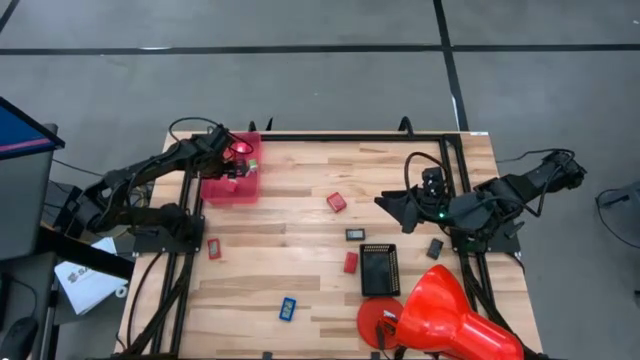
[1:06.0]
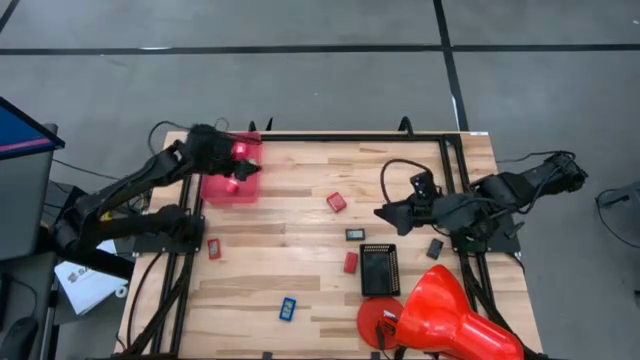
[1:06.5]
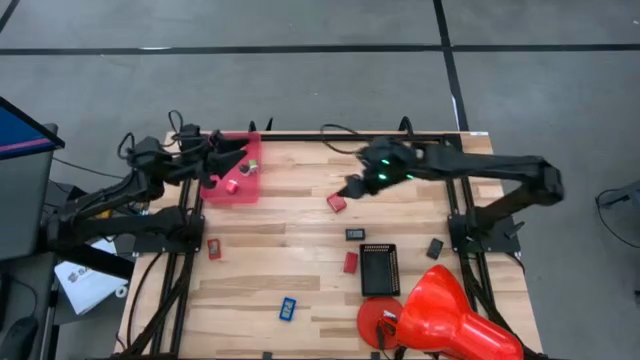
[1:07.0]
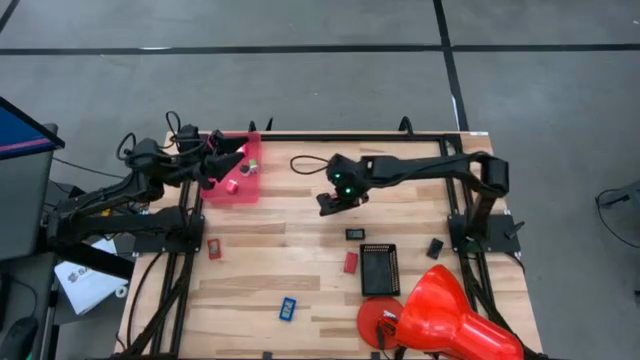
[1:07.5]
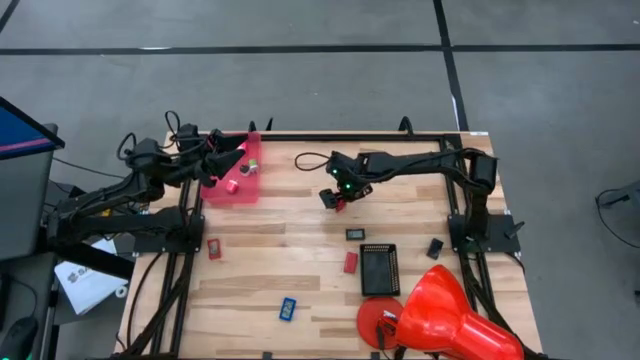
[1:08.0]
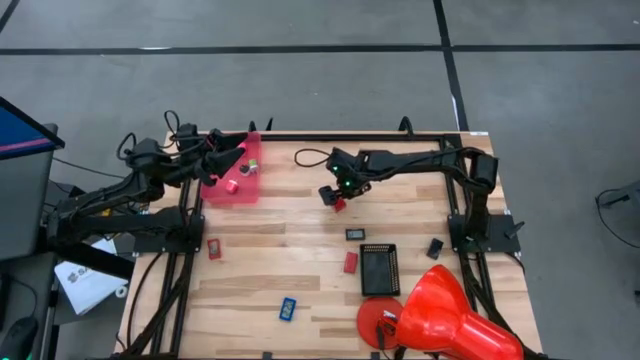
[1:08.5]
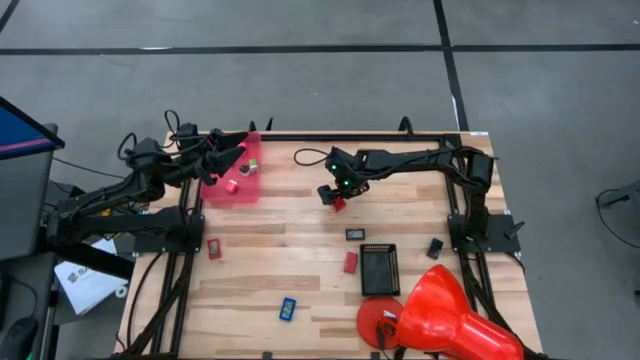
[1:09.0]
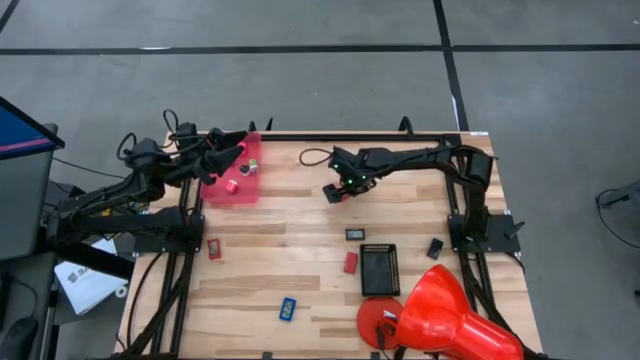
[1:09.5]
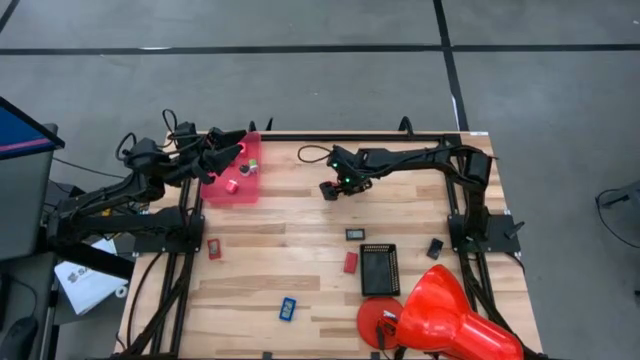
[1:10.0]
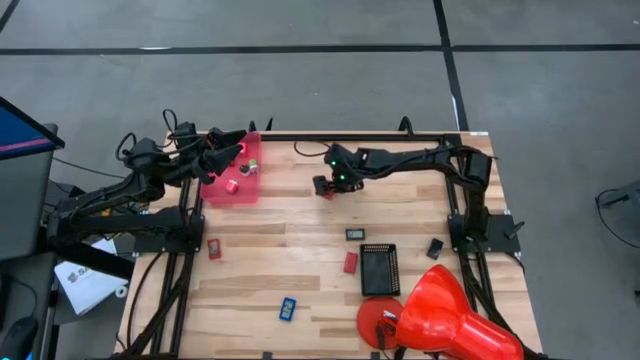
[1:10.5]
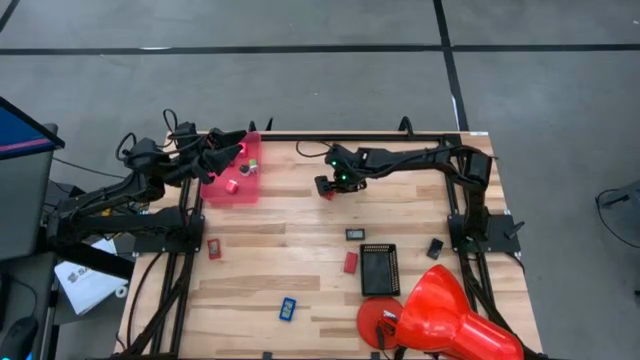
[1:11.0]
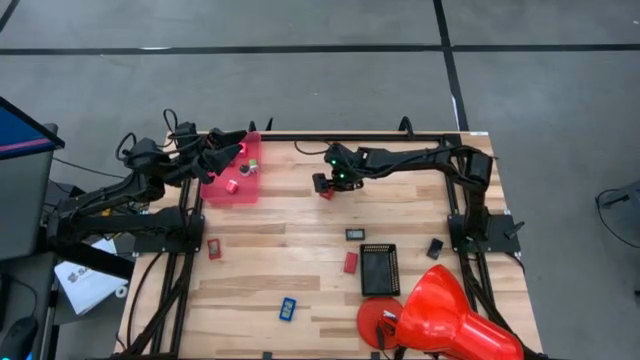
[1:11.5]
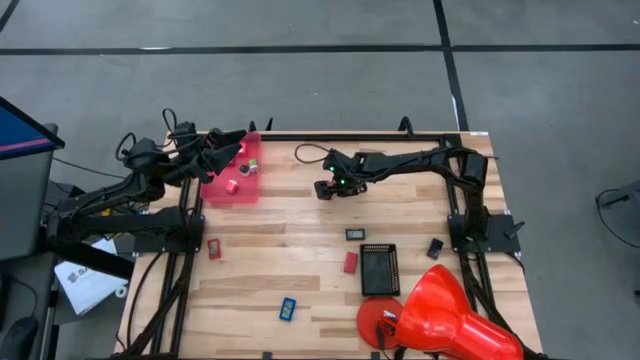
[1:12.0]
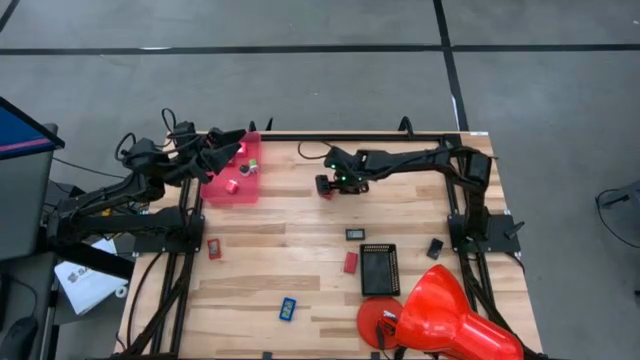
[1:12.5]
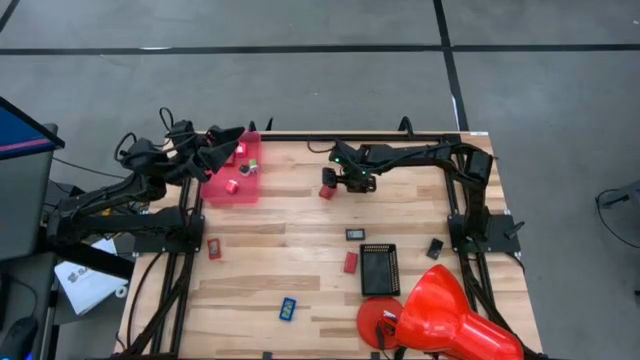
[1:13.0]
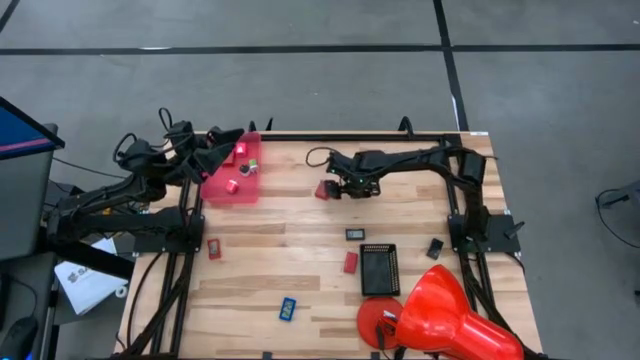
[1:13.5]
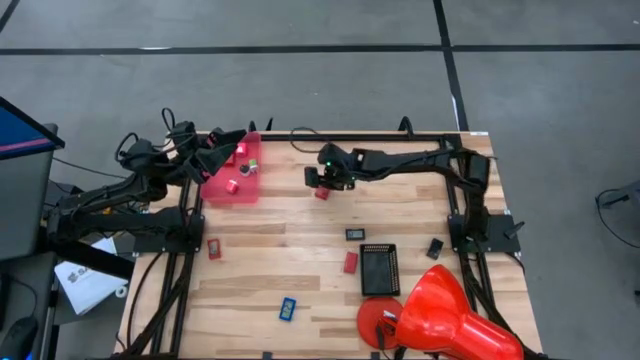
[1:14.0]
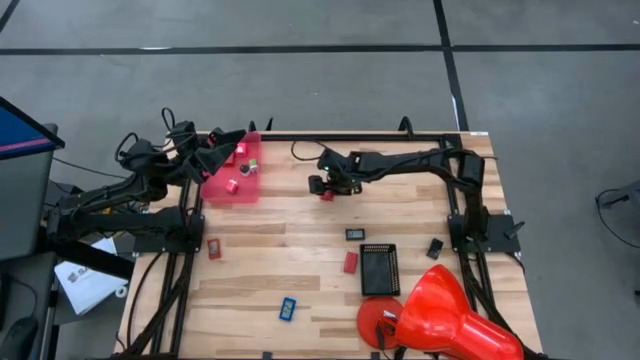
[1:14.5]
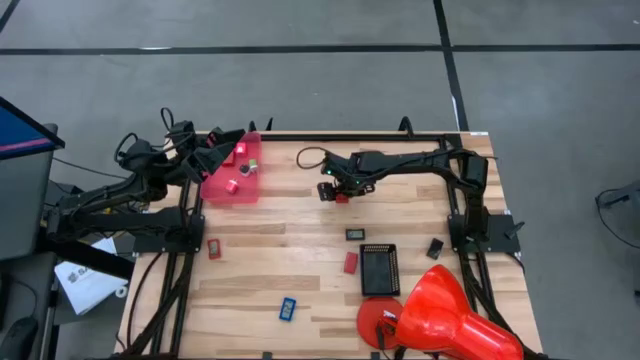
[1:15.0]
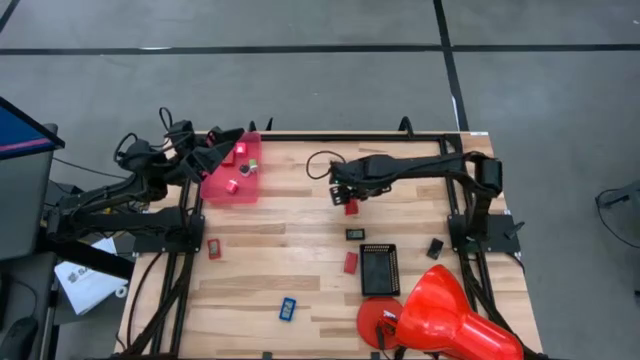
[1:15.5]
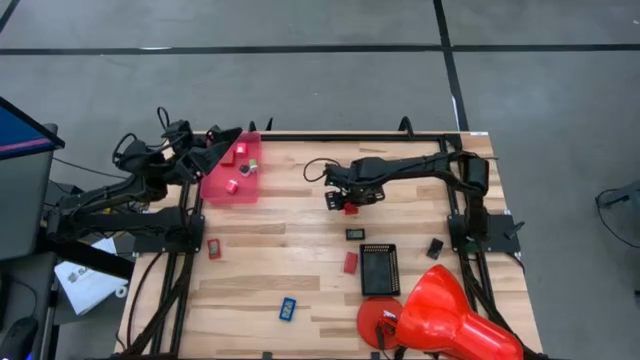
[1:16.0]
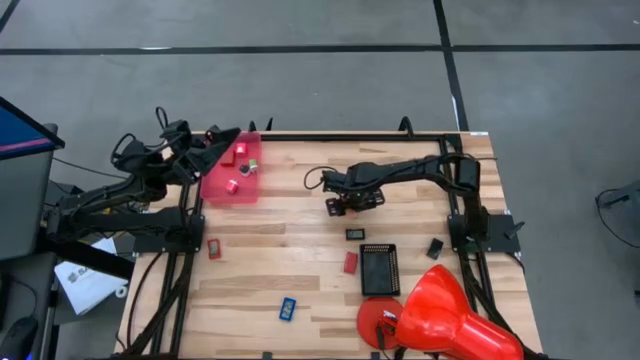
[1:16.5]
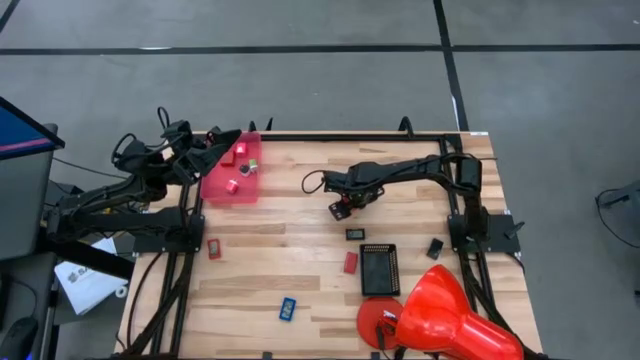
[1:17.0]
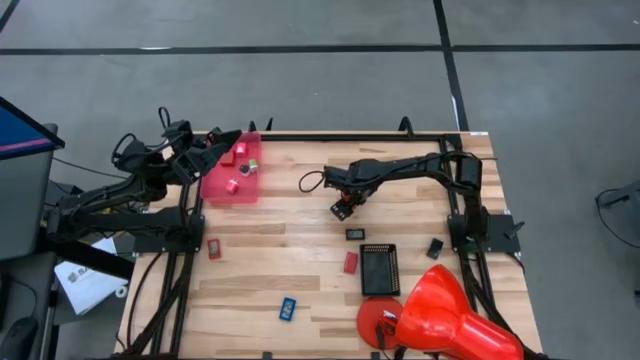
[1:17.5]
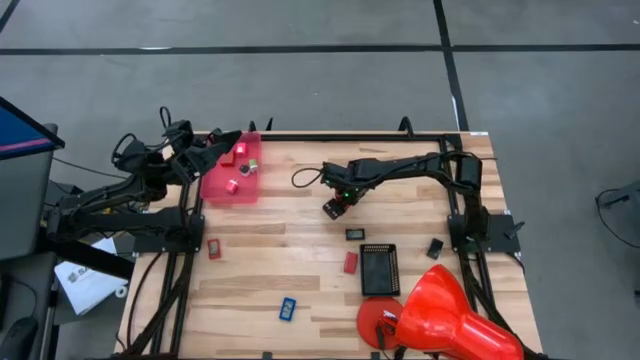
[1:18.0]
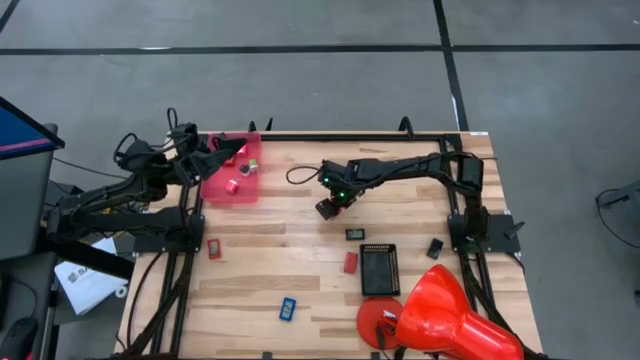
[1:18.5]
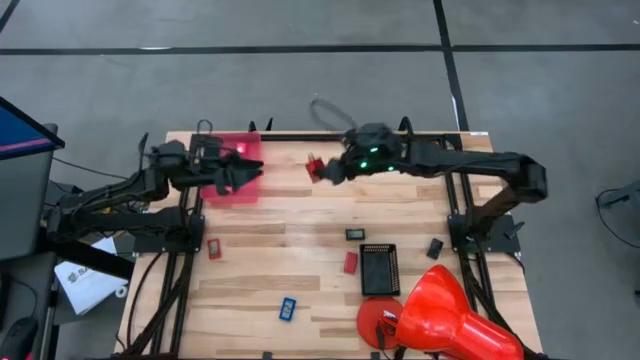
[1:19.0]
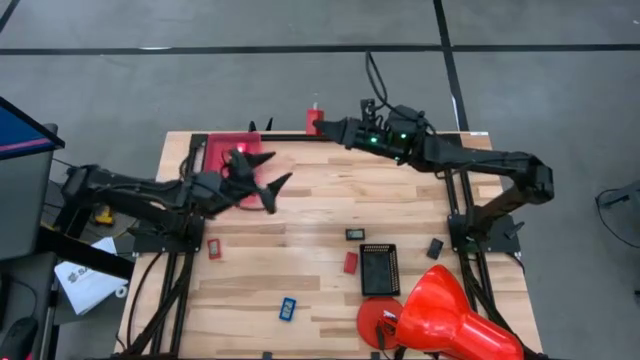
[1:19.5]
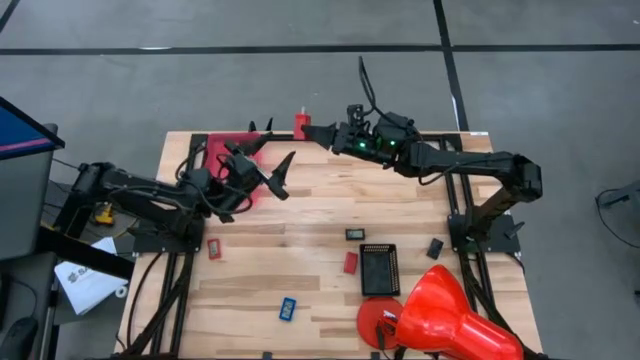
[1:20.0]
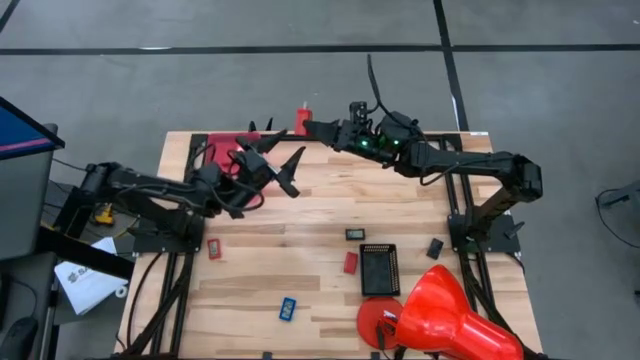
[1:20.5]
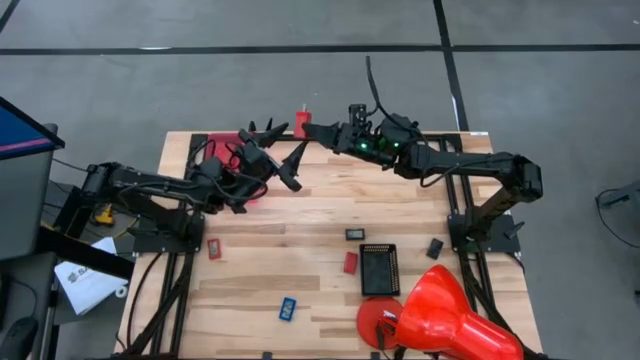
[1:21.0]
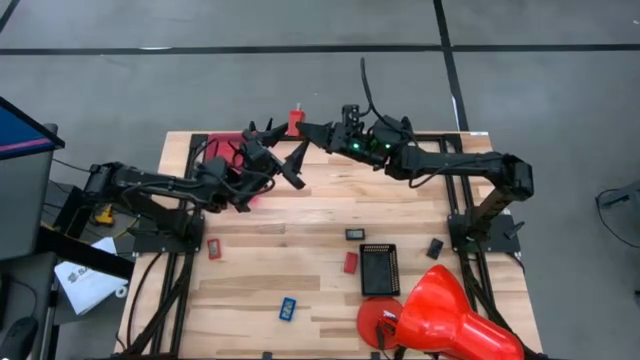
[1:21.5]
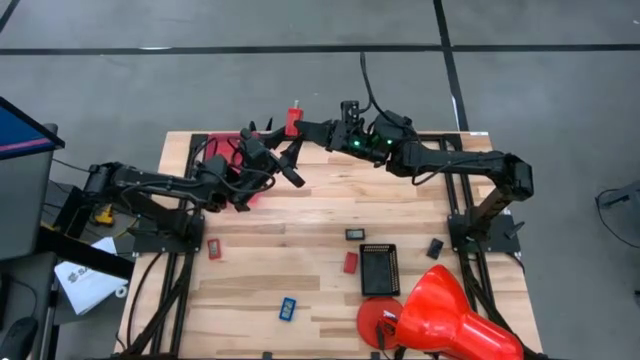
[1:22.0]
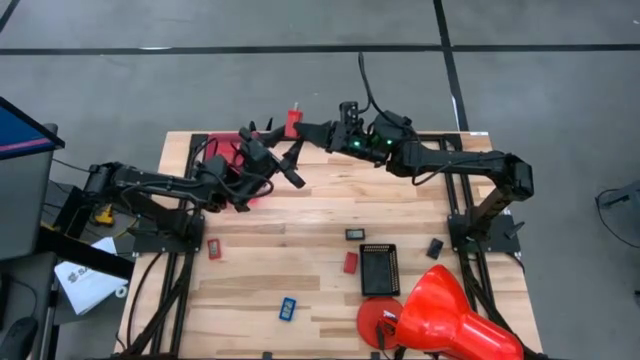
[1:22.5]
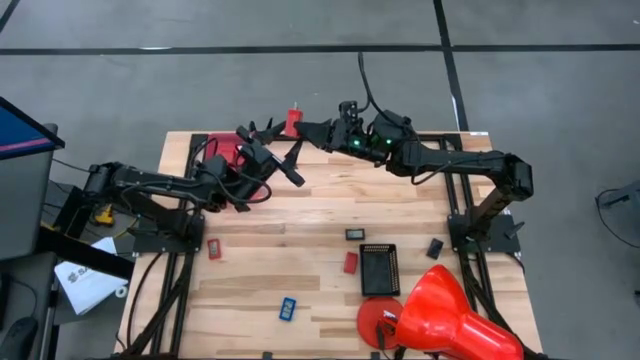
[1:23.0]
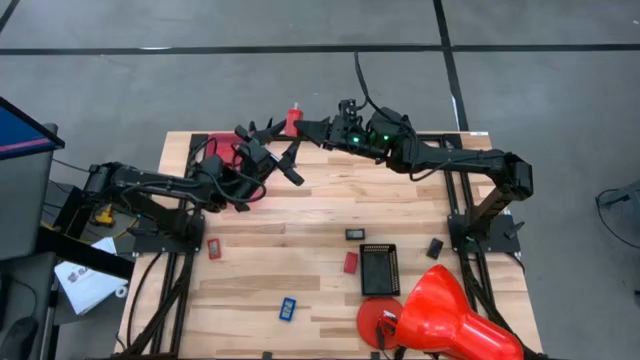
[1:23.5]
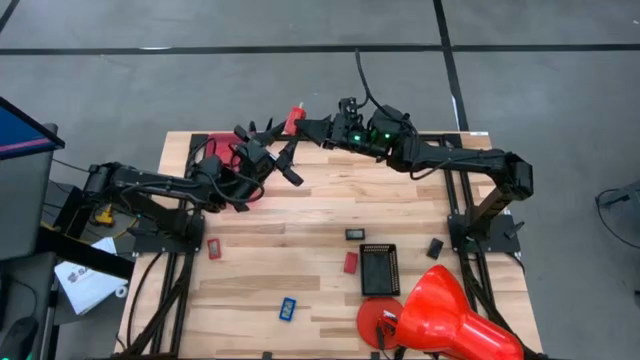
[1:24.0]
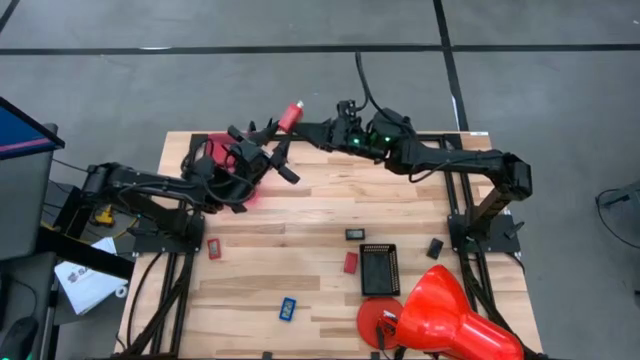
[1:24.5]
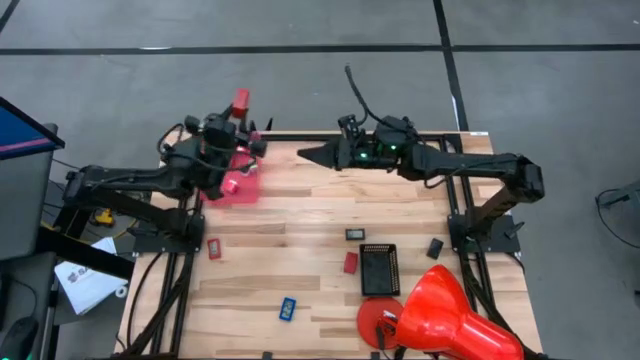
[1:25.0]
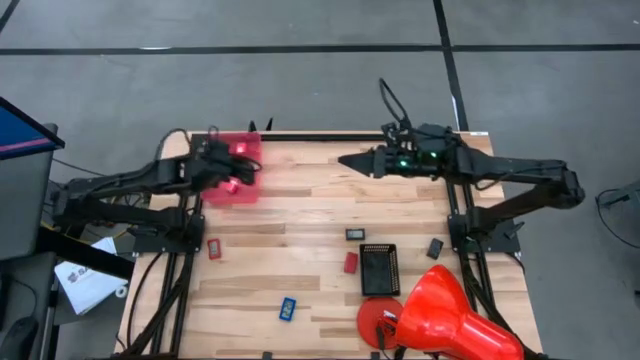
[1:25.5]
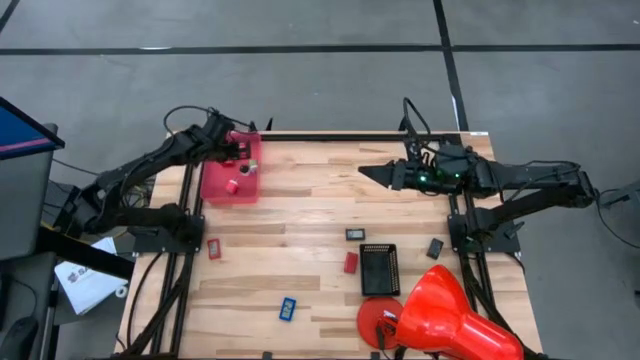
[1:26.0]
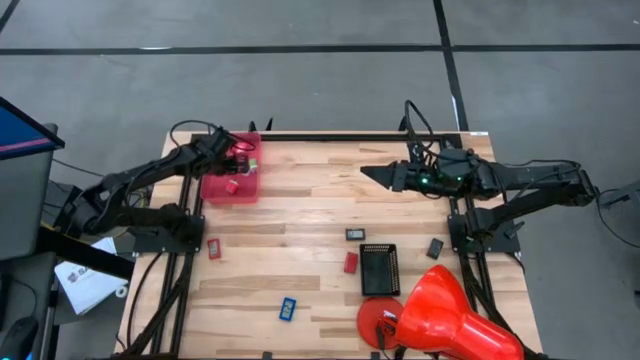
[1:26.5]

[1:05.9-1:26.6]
Task: Pick & Place Office items
Put the red charger adapter into the pink bin
